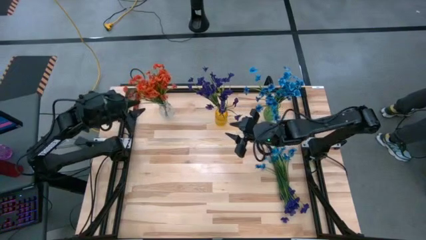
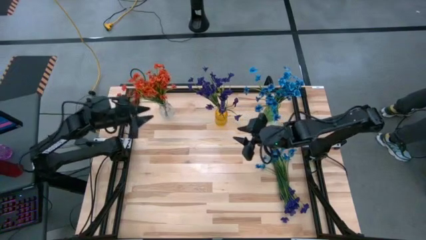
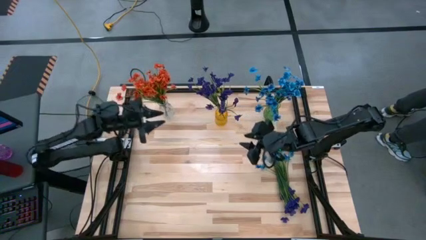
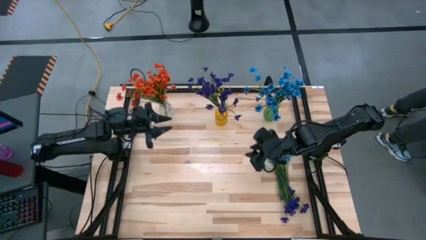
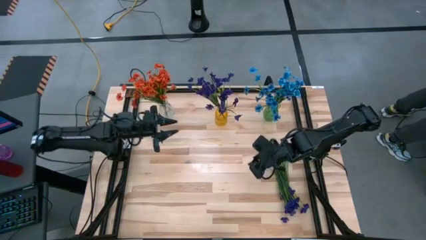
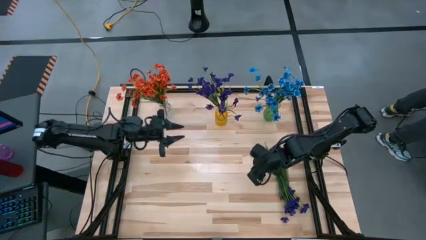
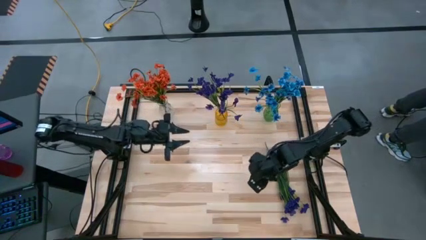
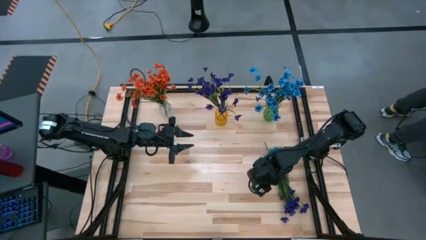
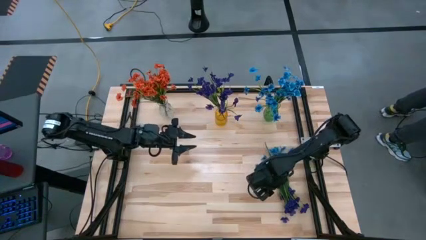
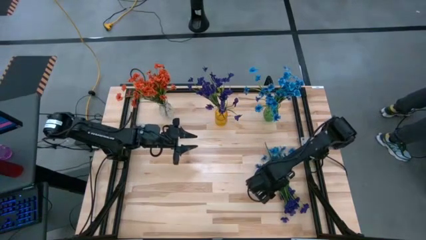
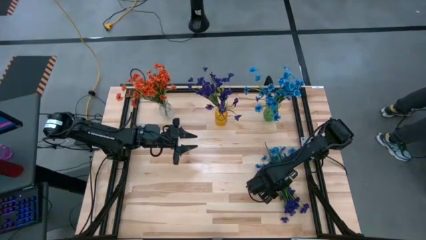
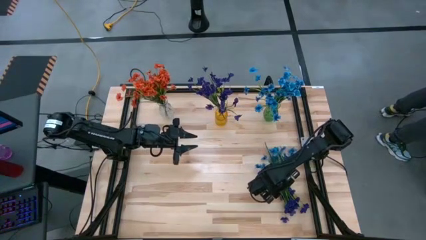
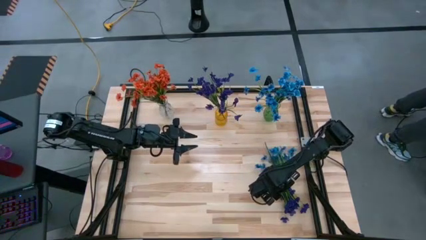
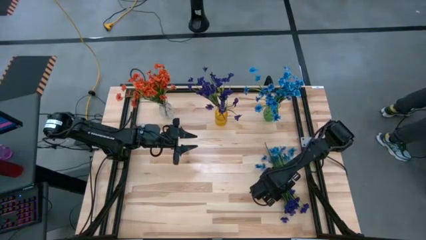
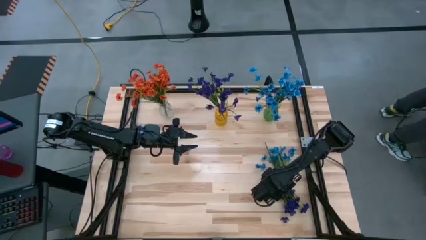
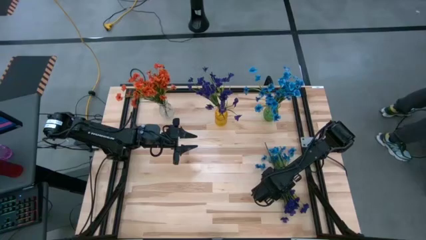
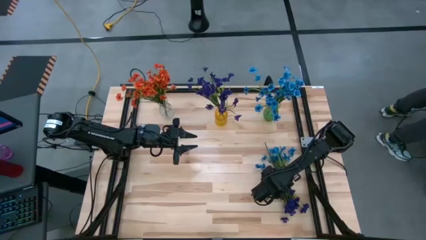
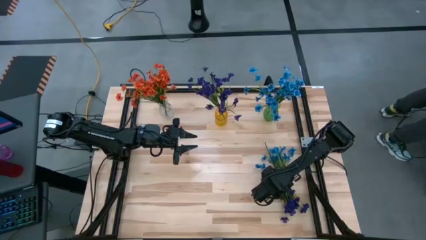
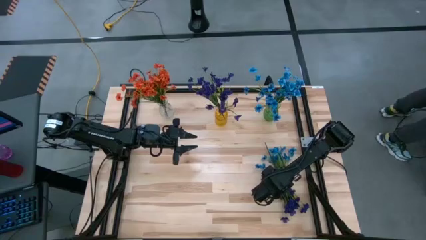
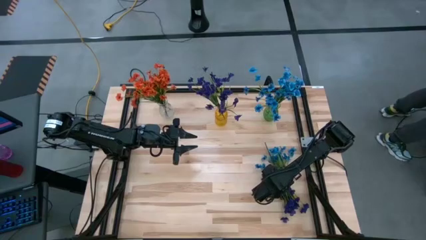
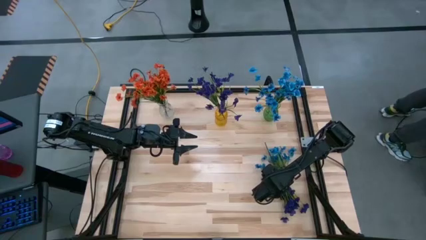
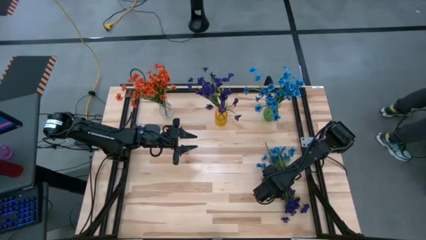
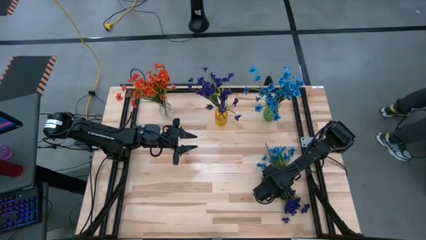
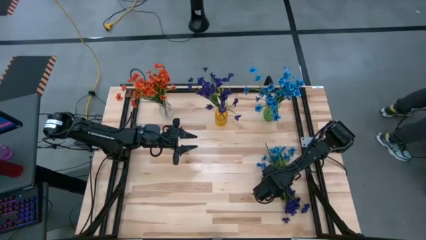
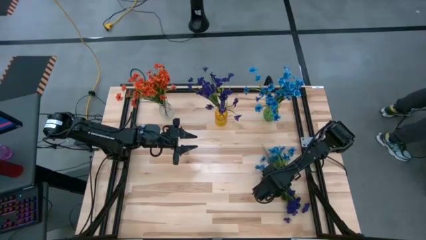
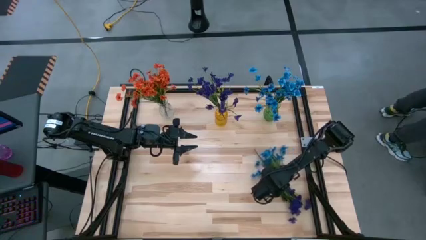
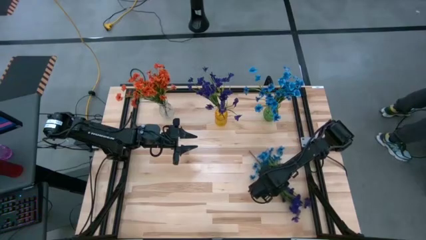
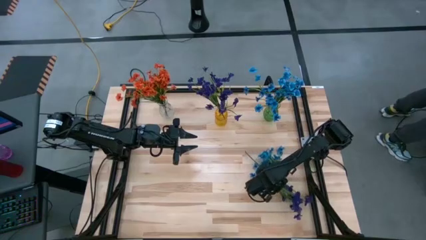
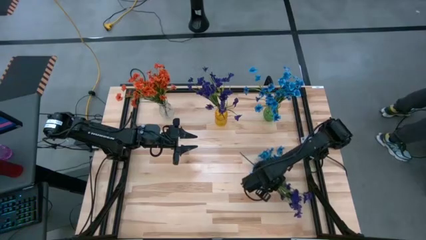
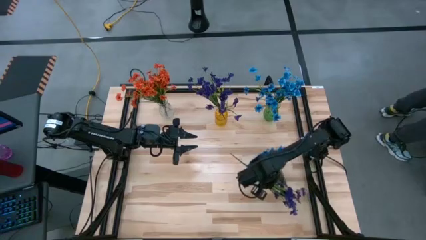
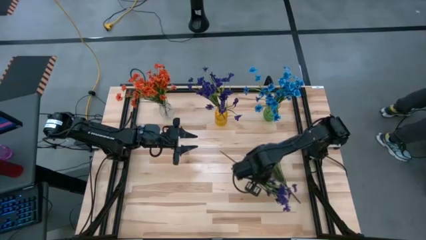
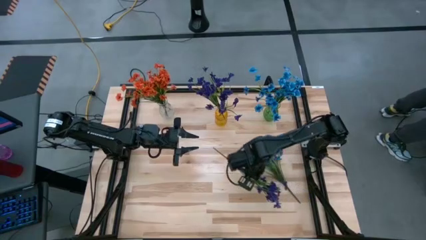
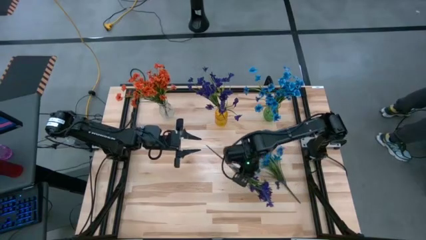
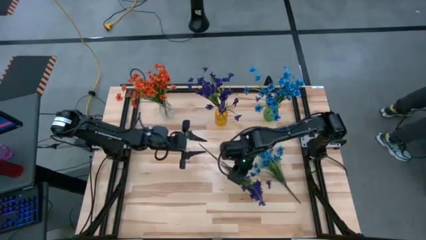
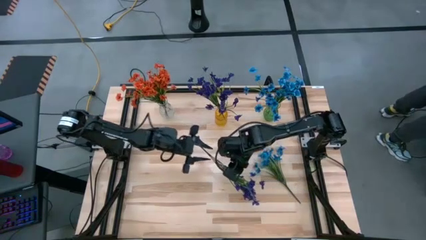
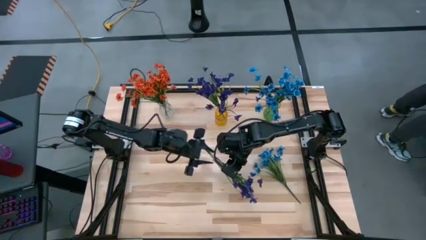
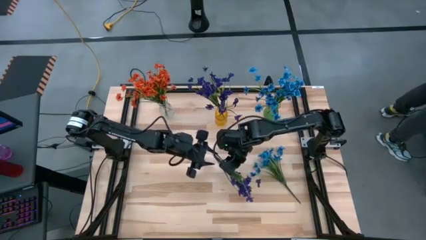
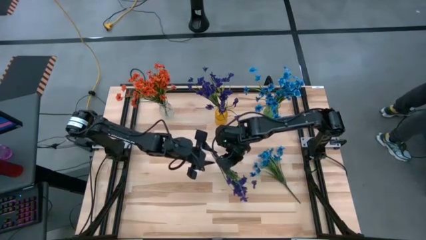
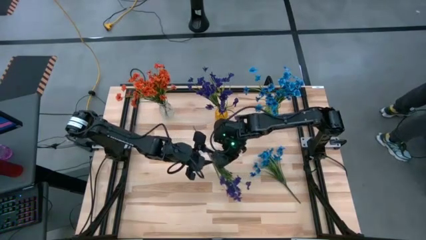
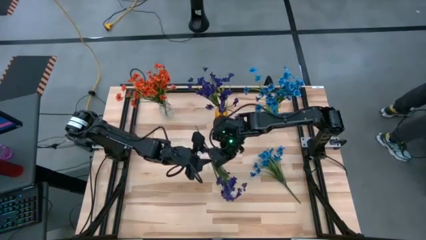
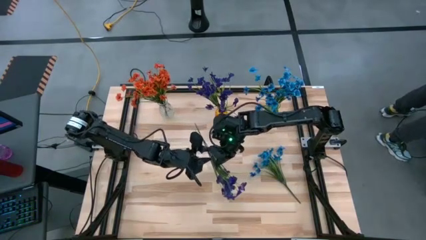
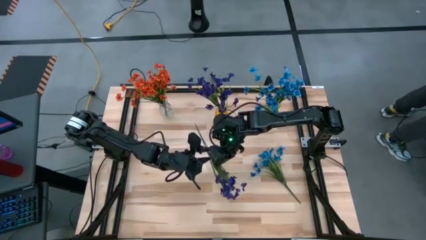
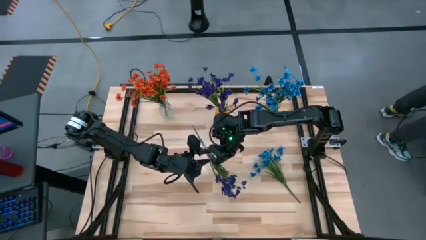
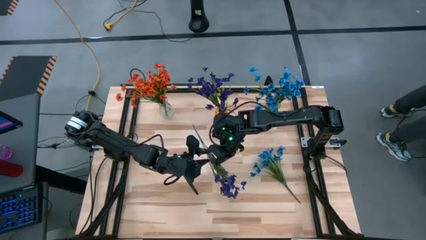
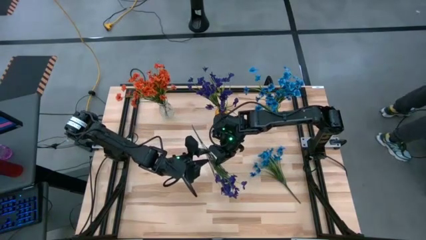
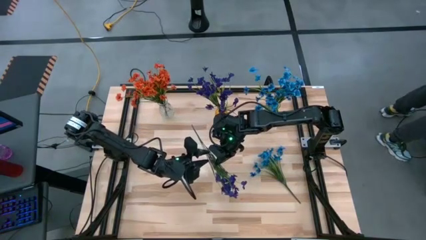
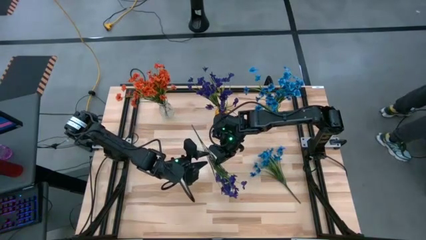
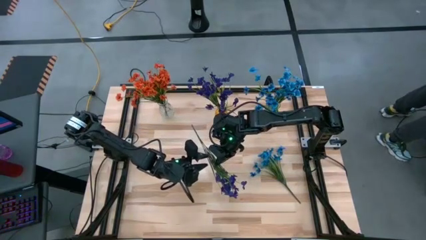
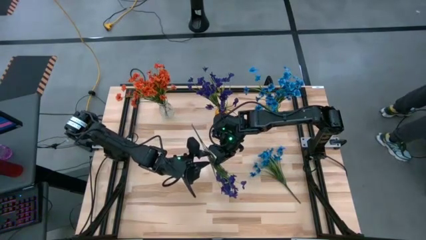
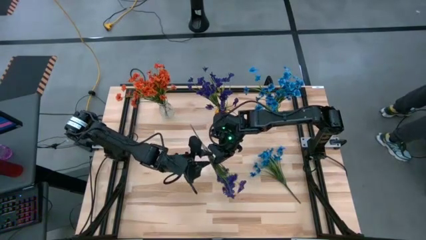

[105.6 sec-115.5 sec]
Task: Sort flowers into vase by color
Put the purple flower into the orange vase
